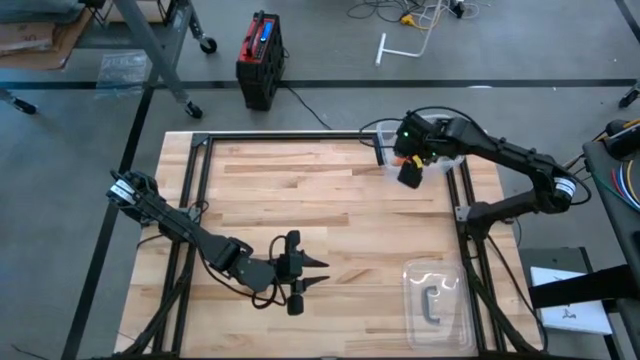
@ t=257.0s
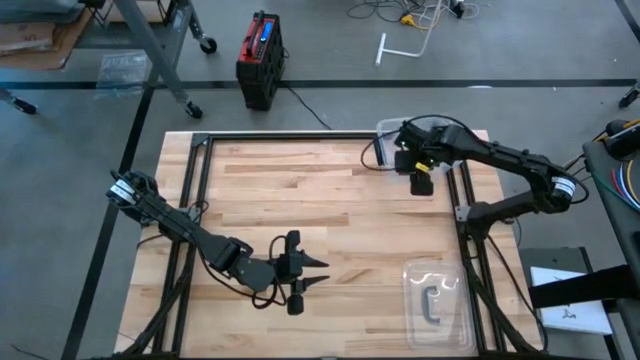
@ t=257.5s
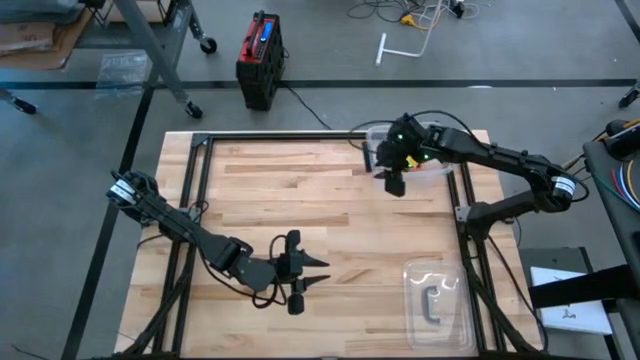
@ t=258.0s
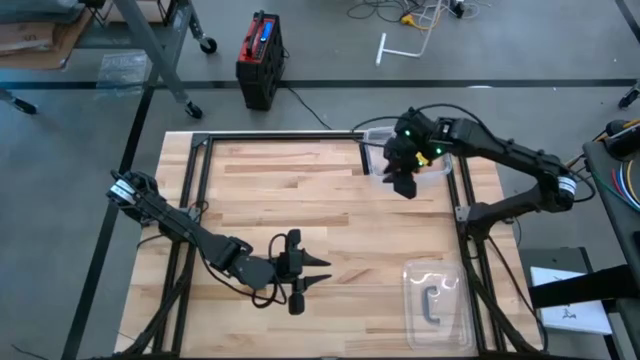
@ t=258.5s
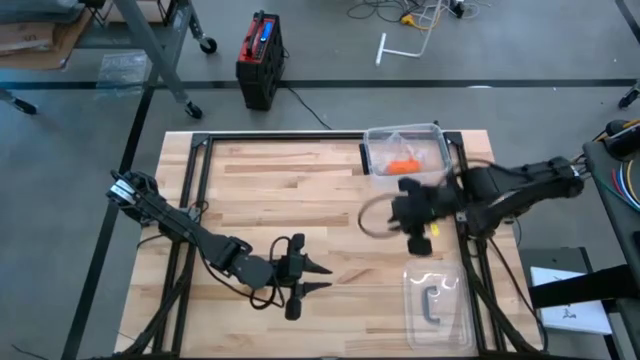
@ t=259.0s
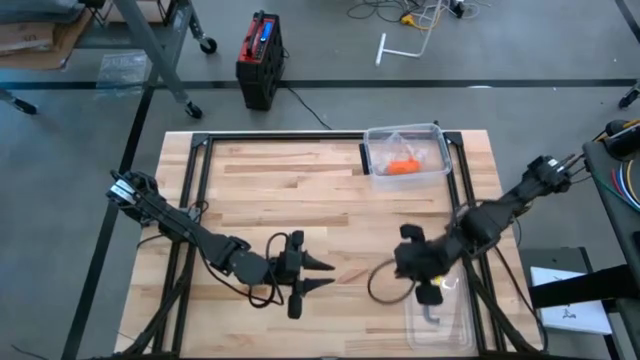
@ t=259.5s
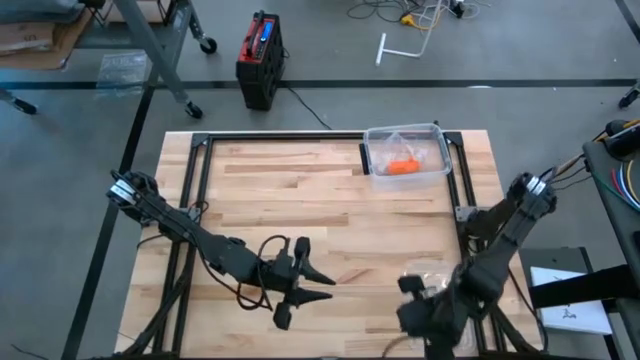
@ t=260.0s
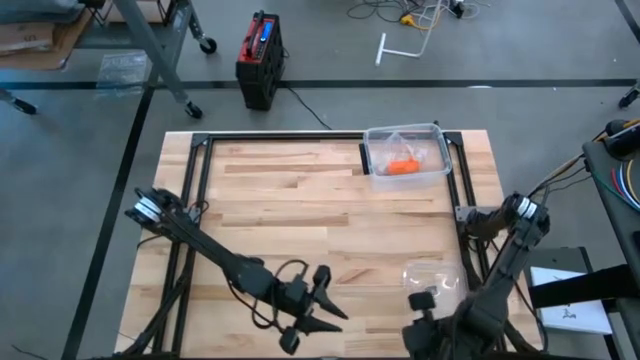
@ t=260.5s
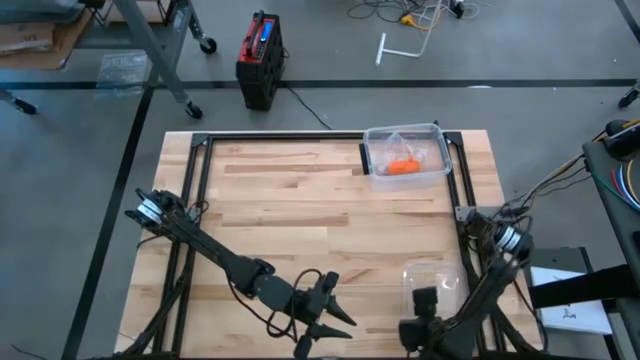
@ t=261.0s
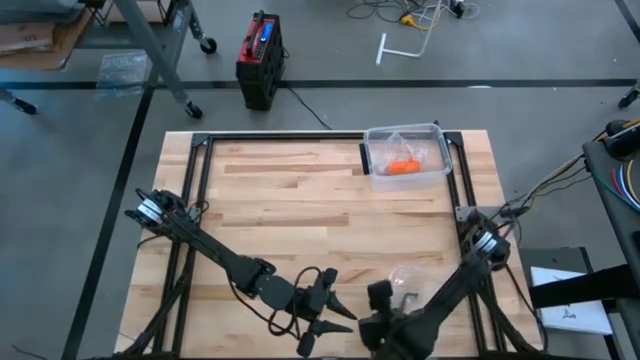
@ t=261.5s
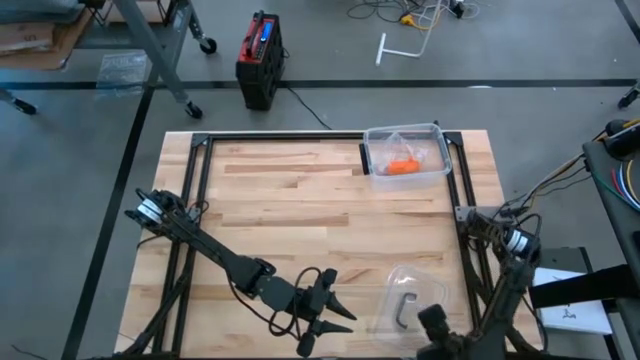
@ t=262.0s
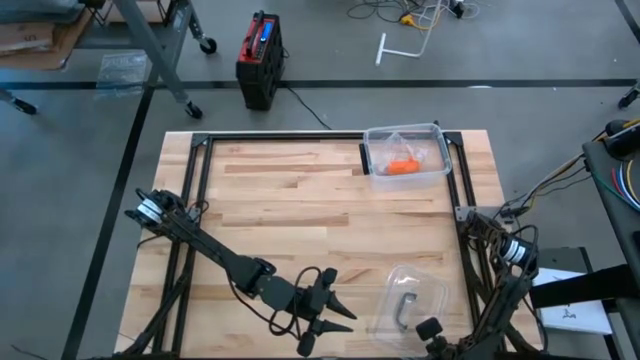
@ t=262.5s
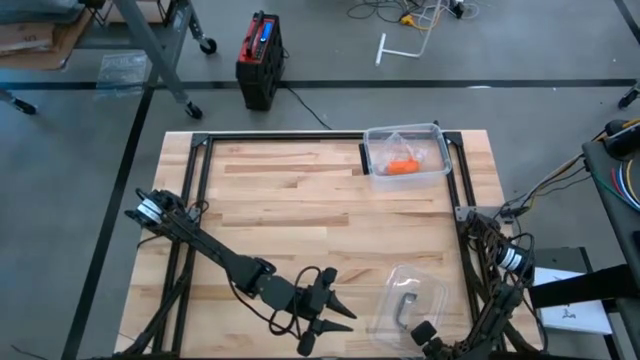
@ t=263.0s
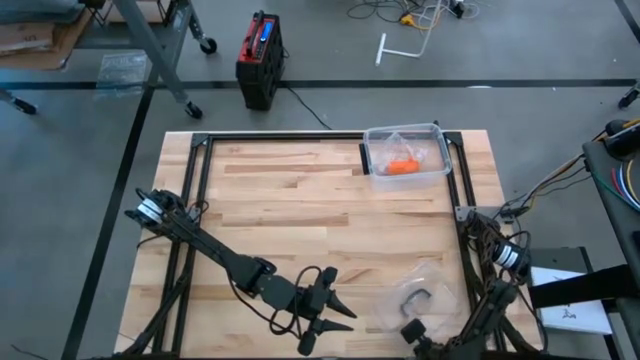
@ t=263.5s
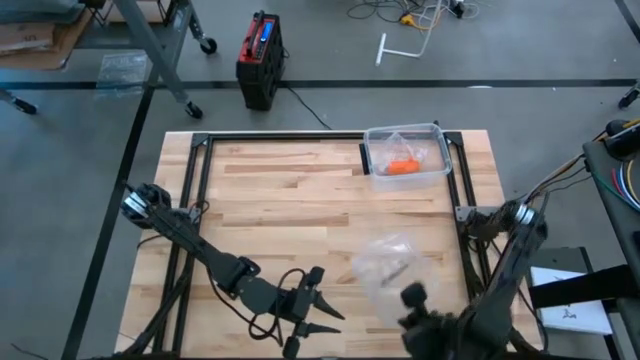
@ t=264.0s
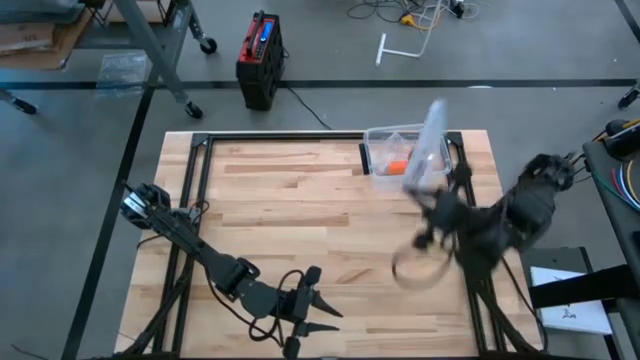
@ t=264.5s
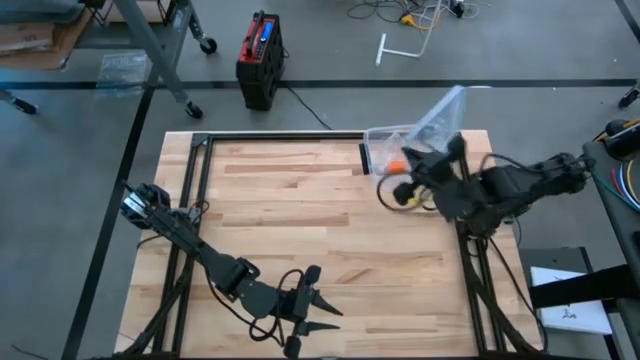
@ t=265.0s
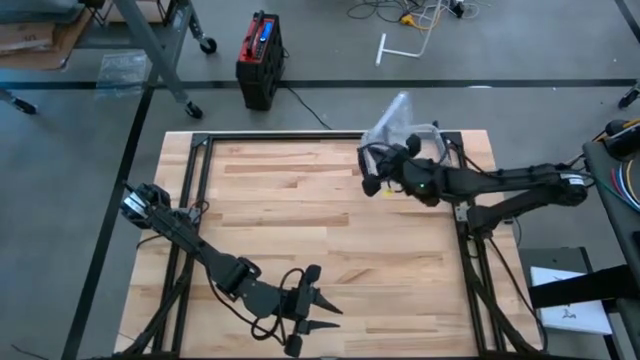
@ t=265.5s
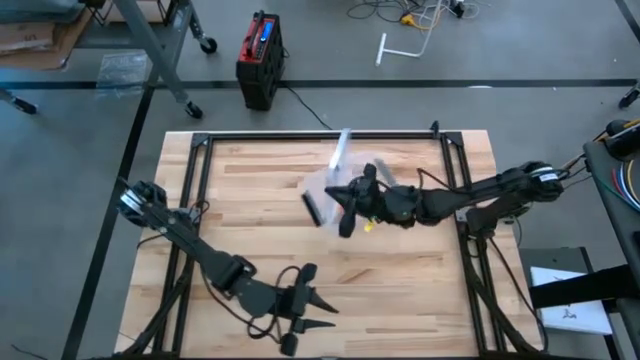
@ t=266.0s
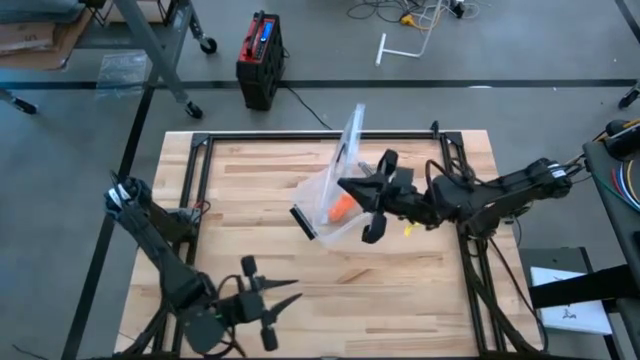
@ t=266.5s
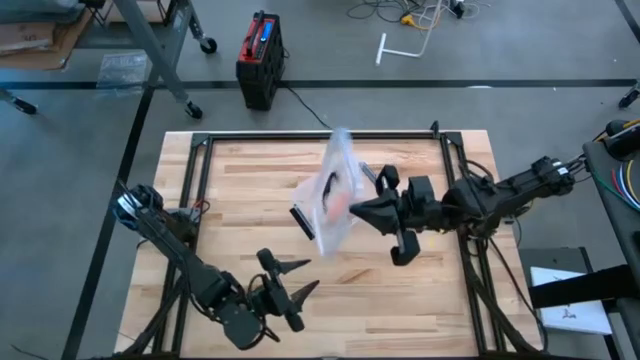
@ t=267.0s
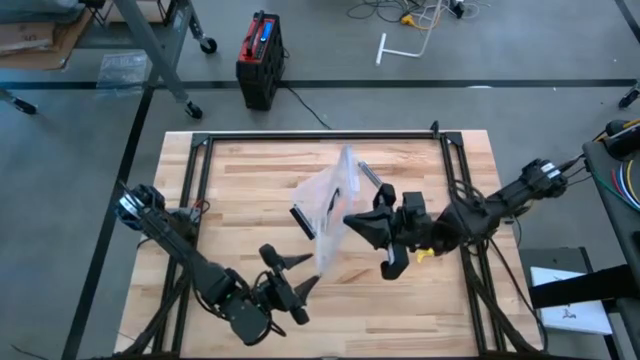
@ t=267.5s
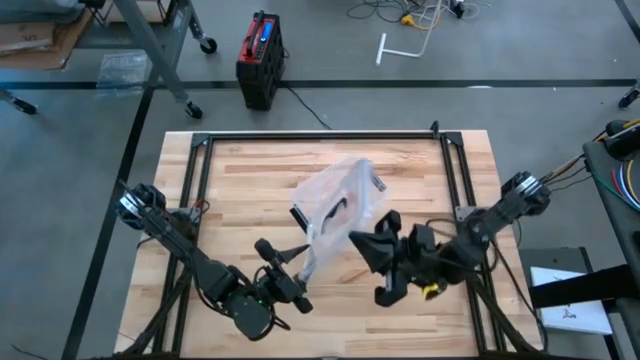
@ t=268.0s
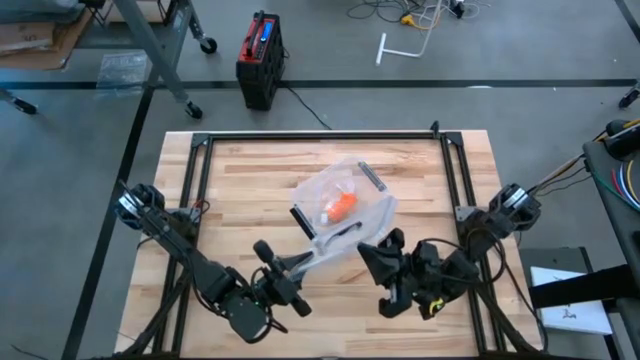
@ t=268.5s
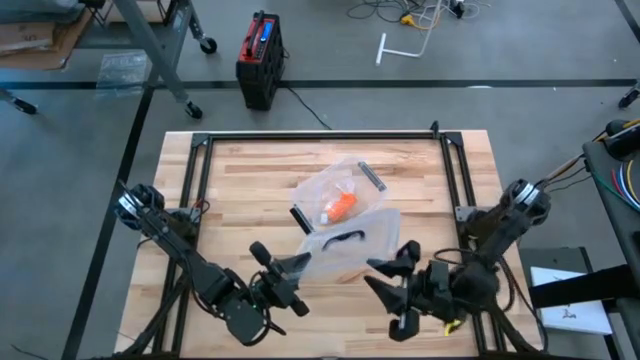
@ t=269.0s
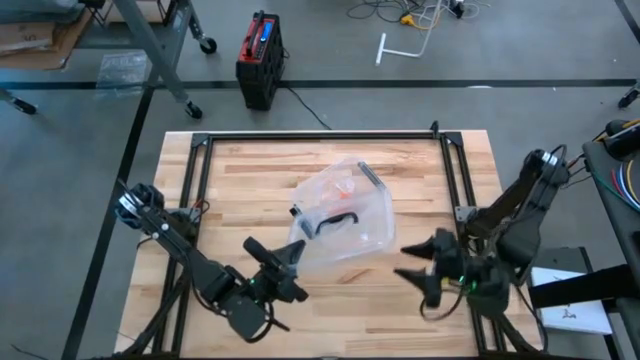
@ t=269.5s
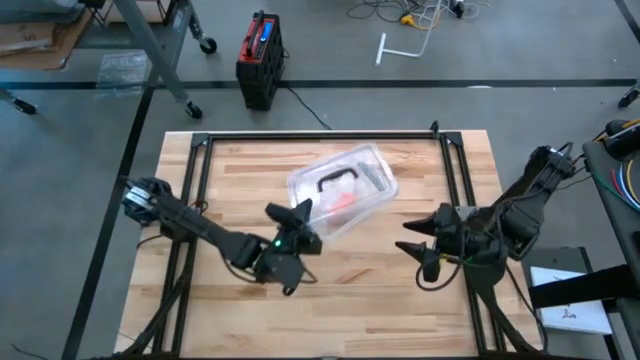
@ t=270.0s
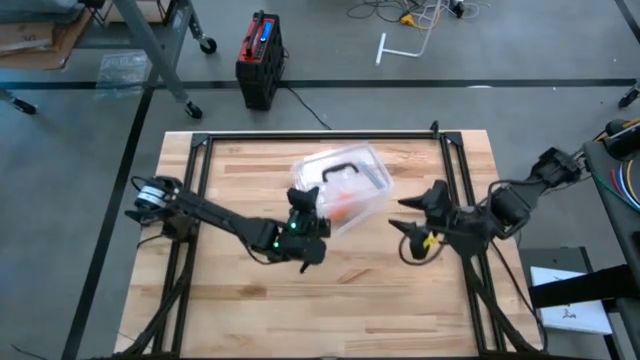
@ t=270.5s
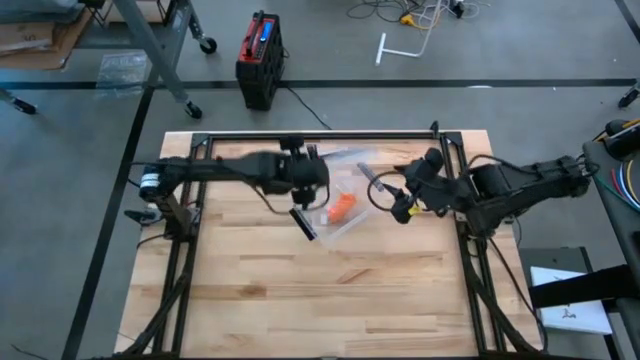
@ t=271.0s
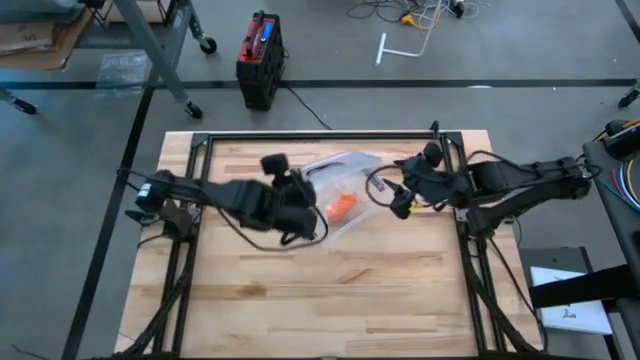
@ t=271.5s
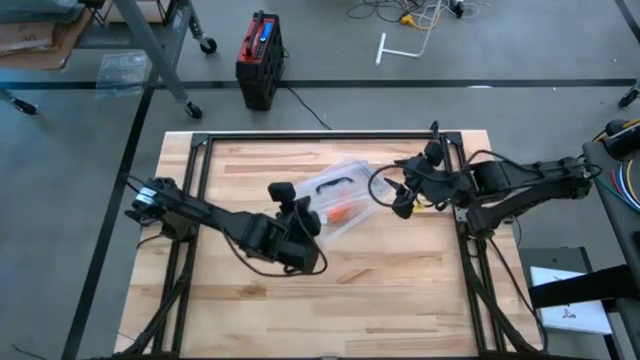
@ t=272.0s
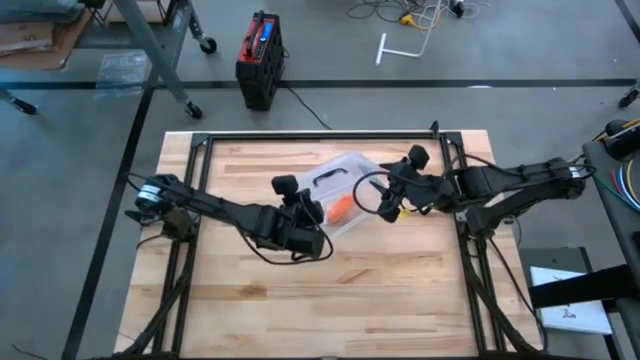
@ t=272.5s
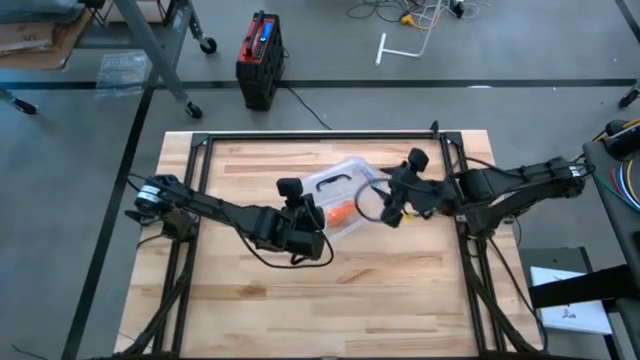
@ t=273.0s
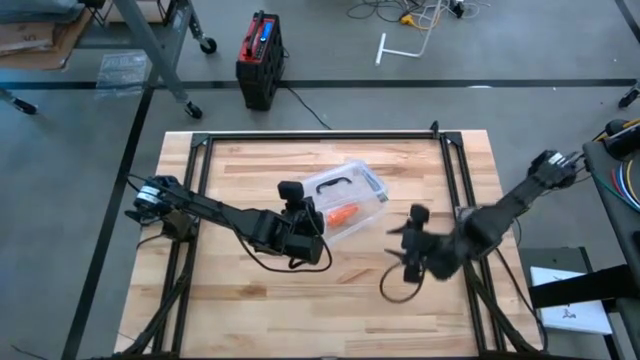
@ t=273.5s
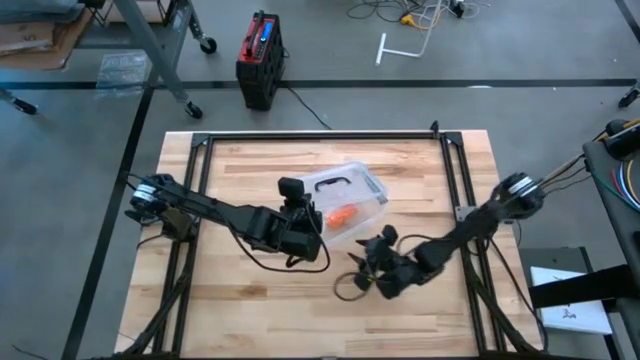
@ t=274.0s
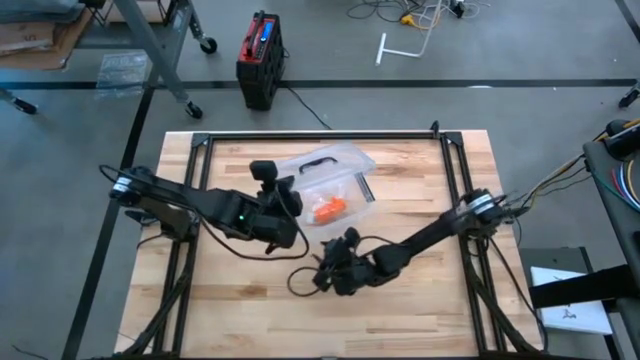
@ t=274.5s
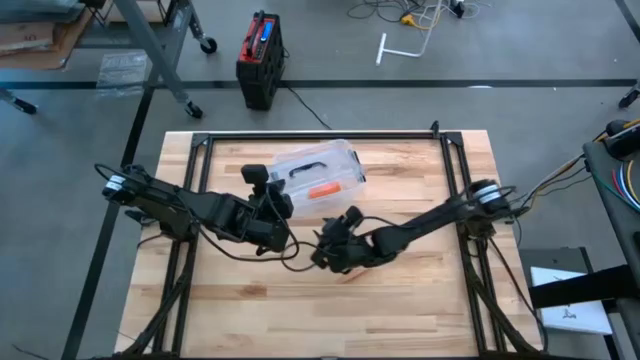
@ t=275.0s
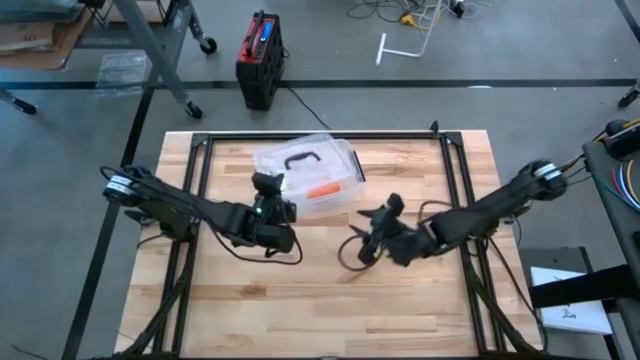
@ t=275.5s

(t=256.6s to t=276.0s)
Task: Roll bandage
Close the transparent bin

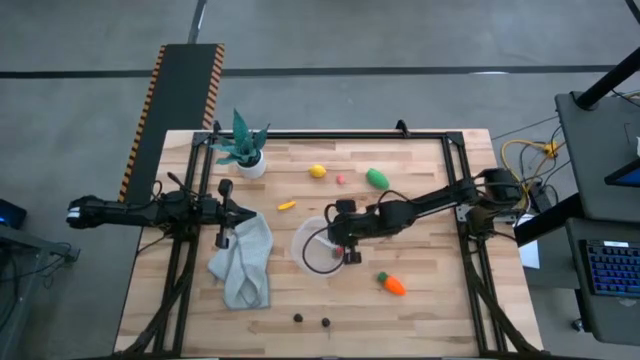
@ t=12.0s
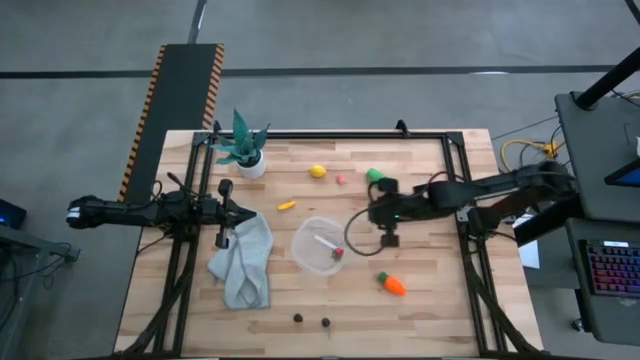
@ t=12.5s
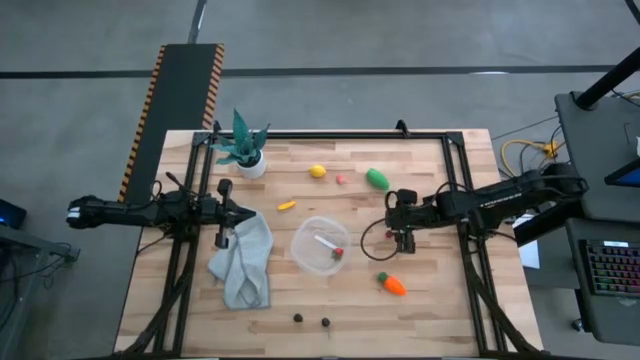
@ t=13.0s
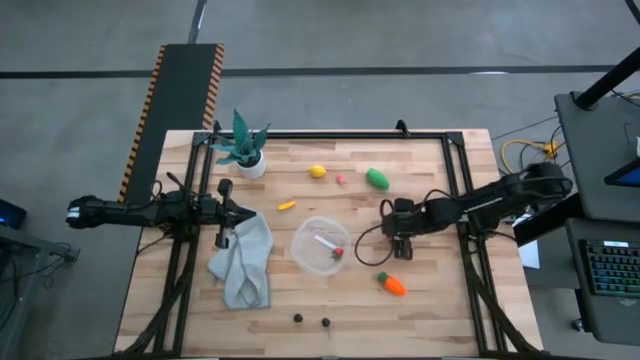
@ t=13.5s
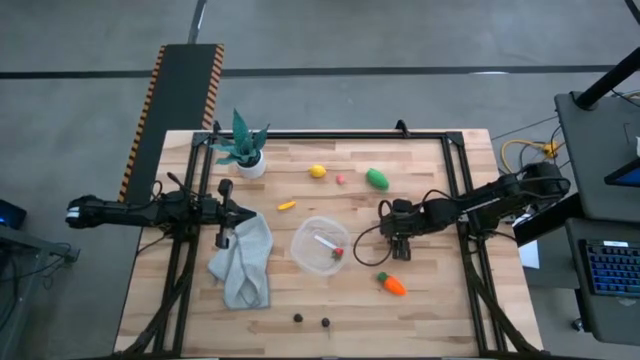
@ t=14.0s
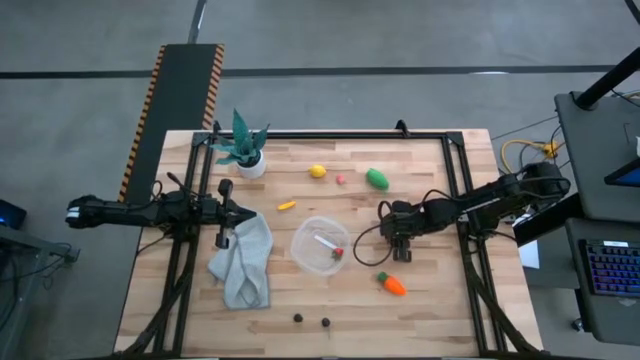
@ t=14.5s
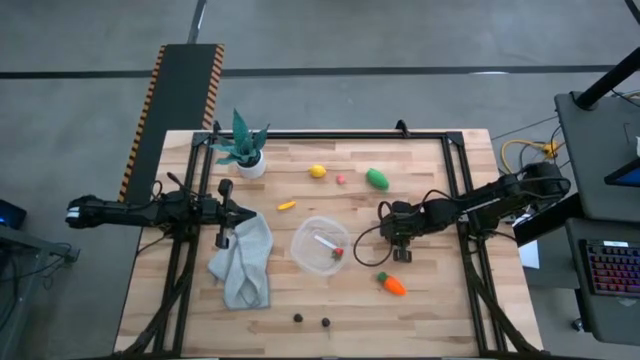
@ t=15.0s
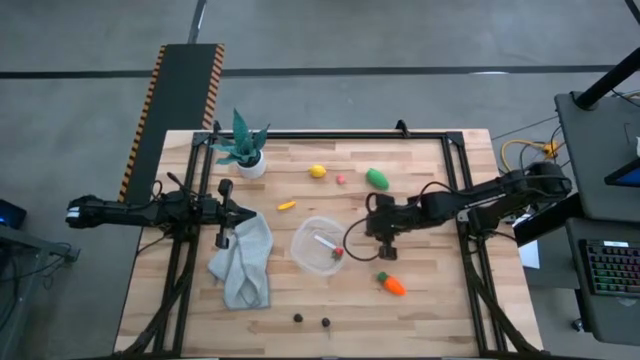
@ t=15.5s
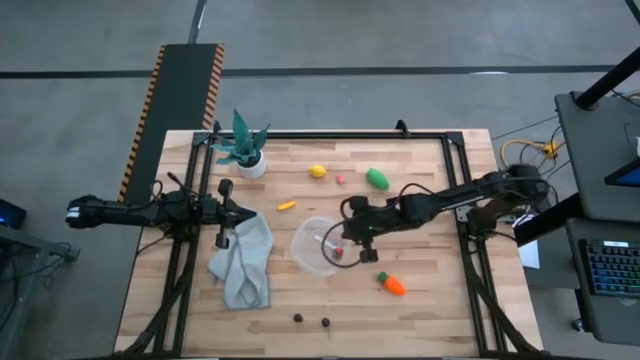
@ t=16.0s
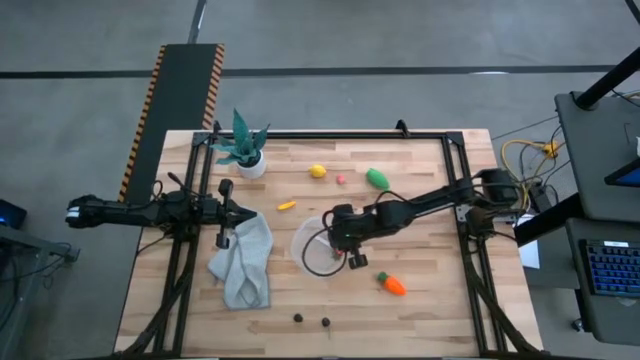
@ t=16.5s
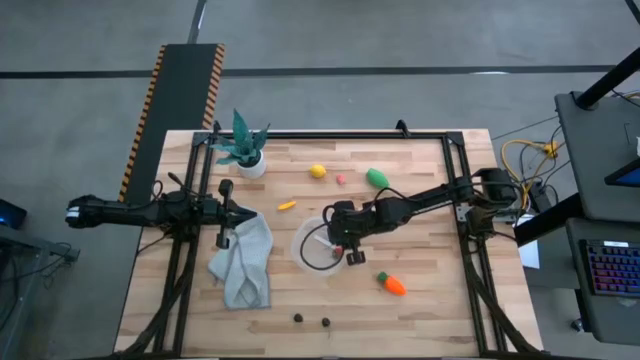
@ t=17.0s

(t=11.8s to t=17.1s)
Task: Pick and placing Produce into tupperware
Put the red cherry into the transparent bin
